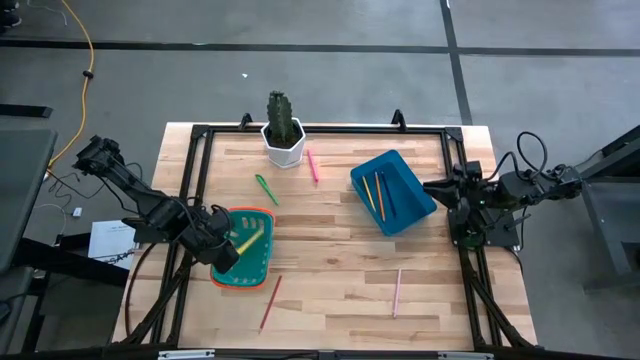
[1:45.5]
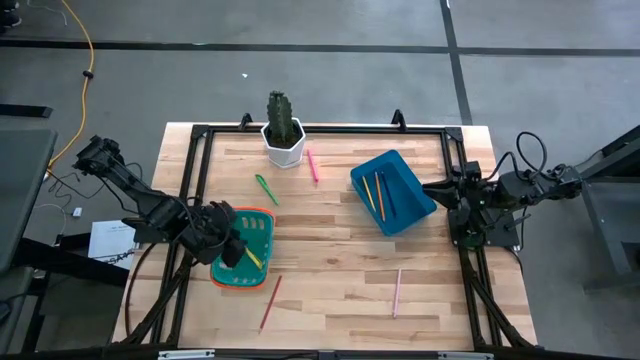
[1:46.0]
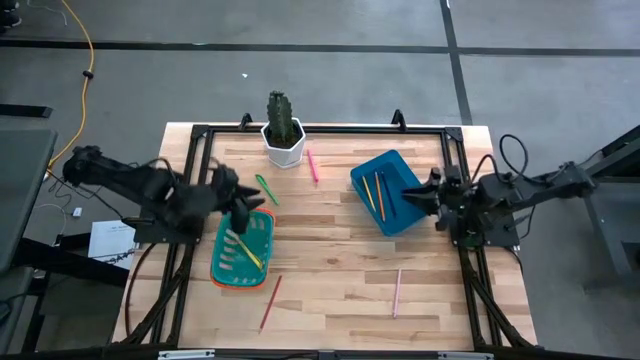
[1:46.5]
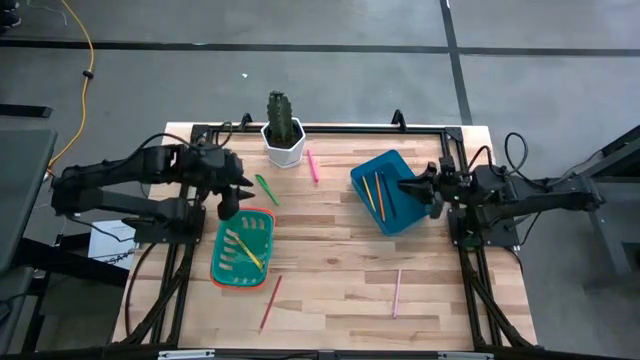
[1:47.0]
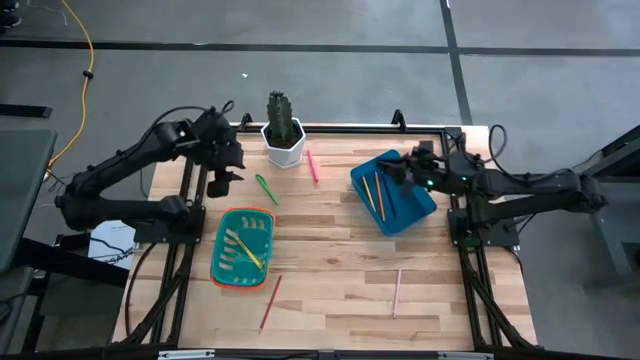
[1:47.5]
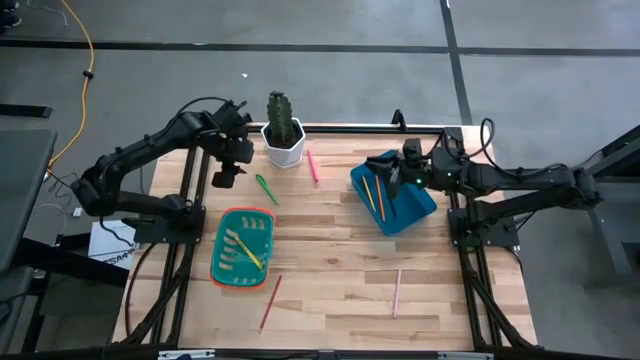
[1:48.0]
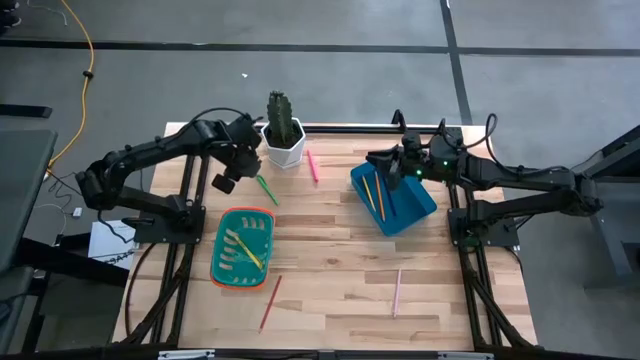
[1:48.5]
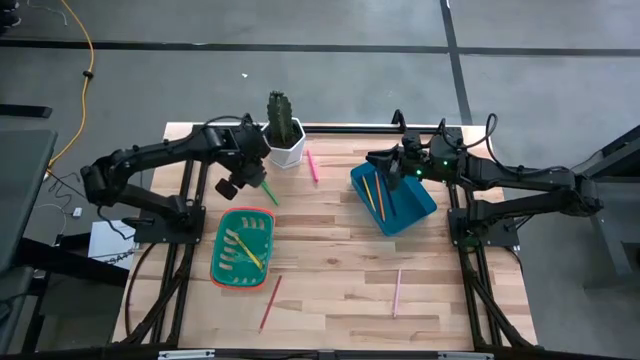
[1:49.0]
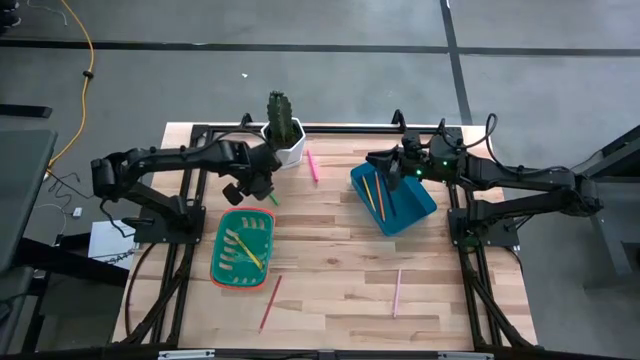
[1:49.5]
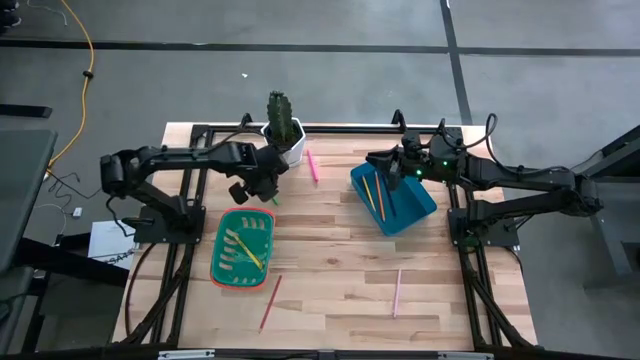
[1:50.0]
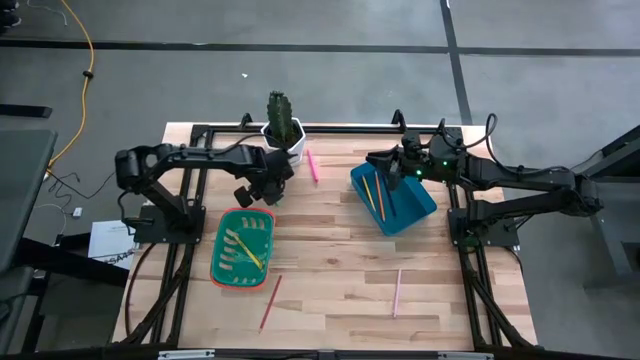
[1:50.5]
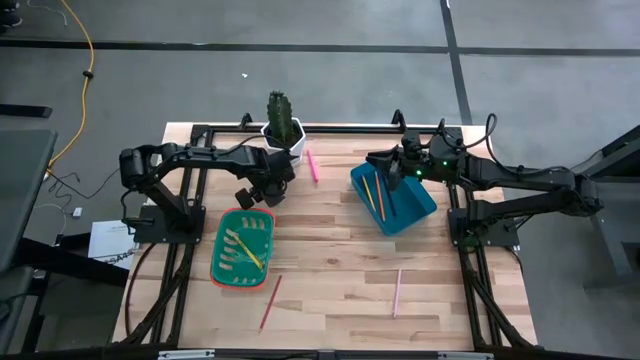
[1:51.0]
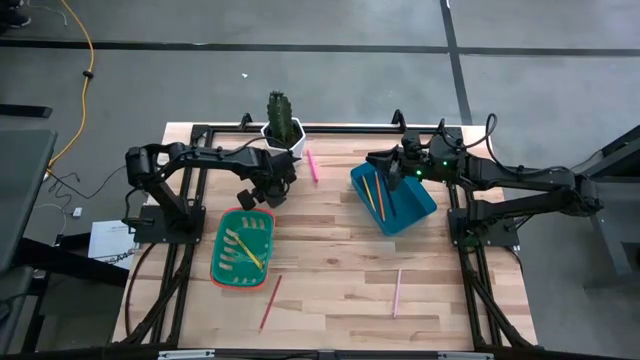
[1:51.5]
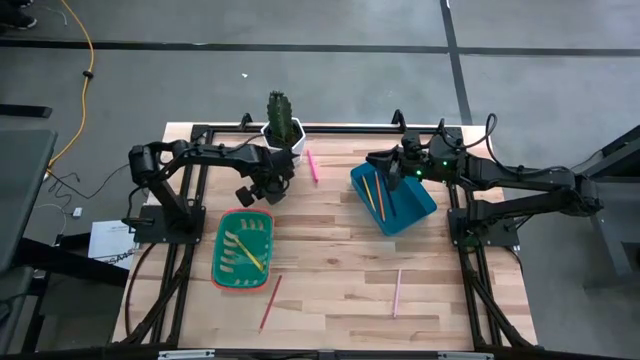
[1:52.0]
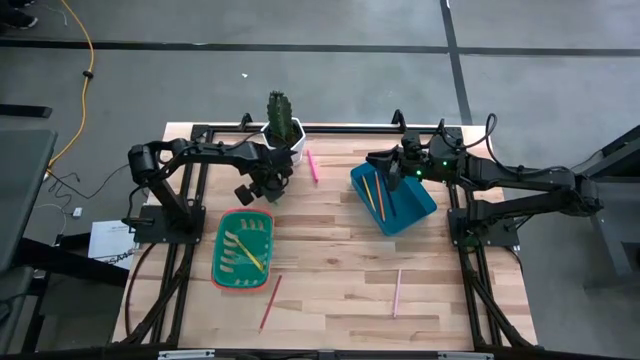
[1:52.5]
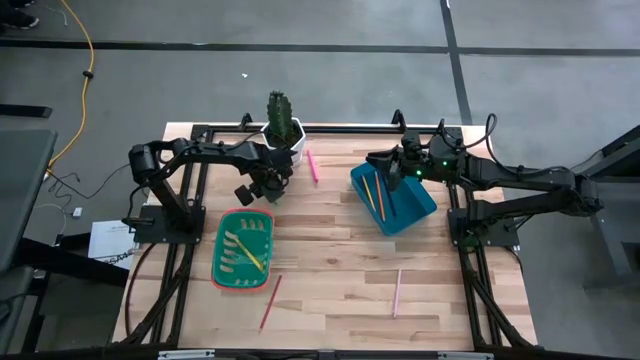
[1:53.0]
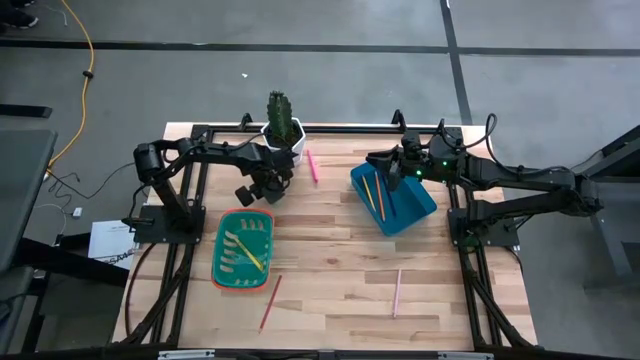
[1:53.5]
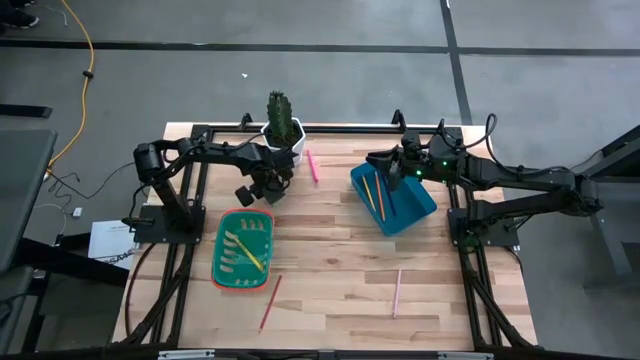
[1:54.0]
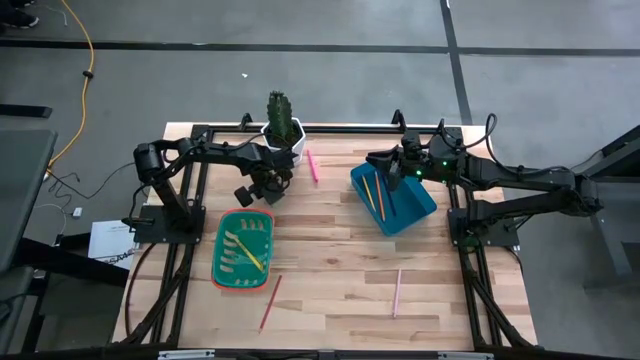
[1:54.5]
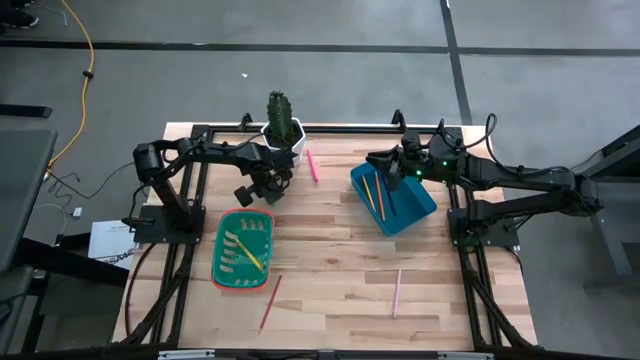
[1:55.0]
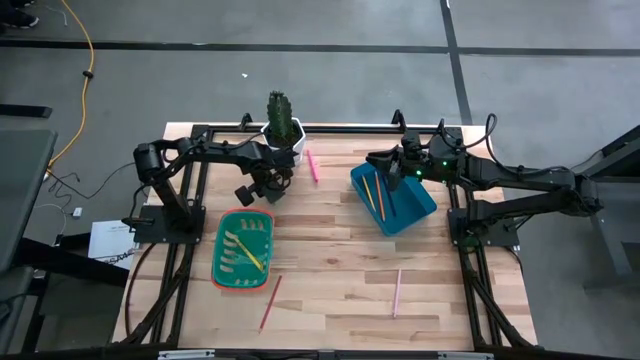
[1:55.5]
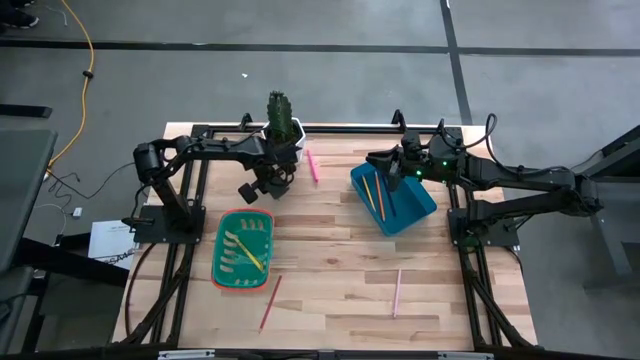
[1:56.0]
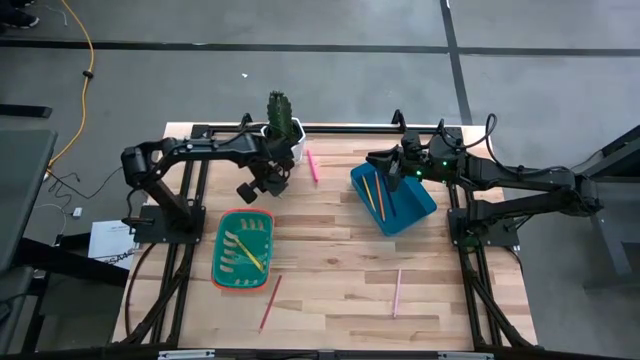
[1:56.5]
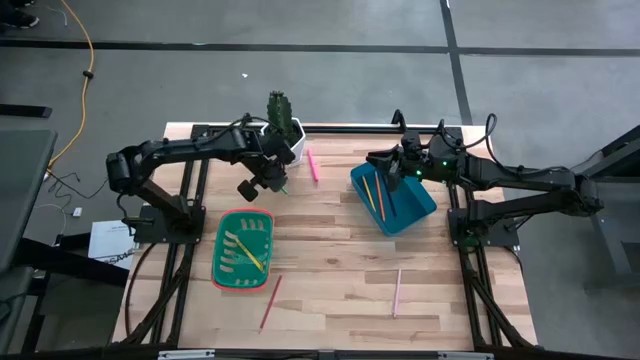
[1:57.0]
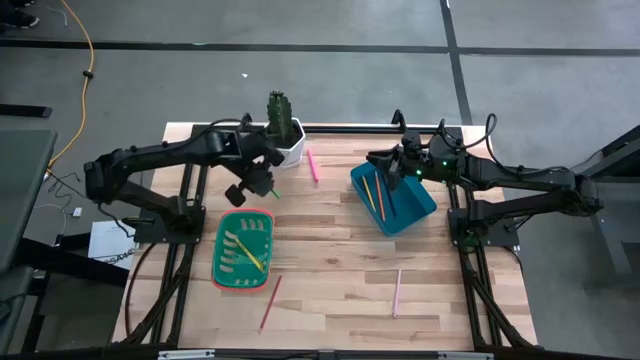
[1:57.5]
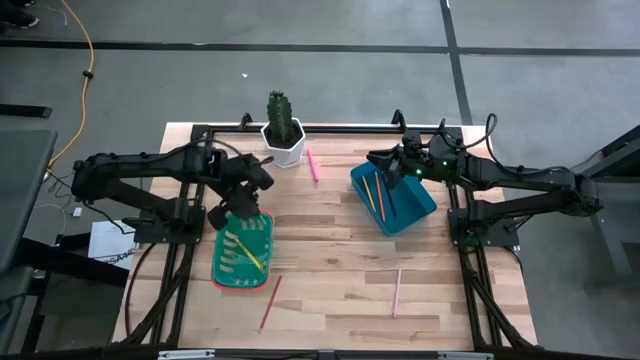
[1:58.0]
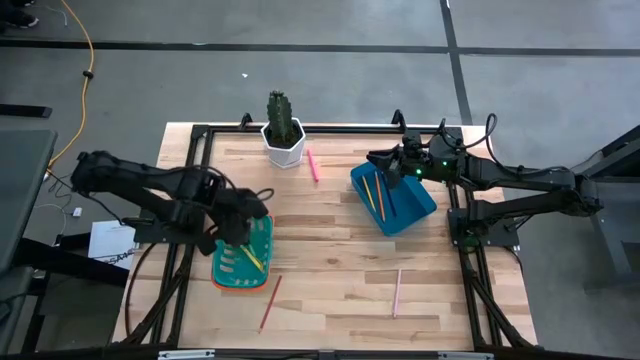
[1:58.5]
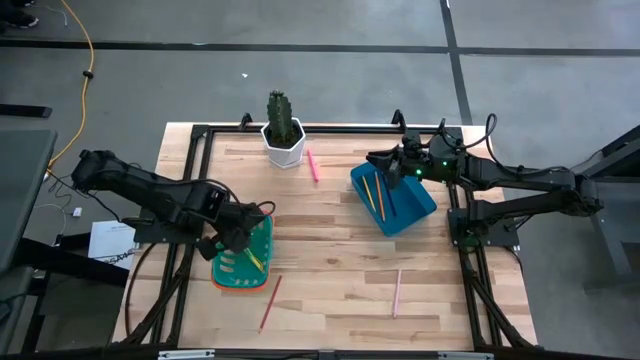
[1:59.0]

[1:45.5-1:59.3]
Task: Sort pens & pencils
Put the green pen into the green basket
